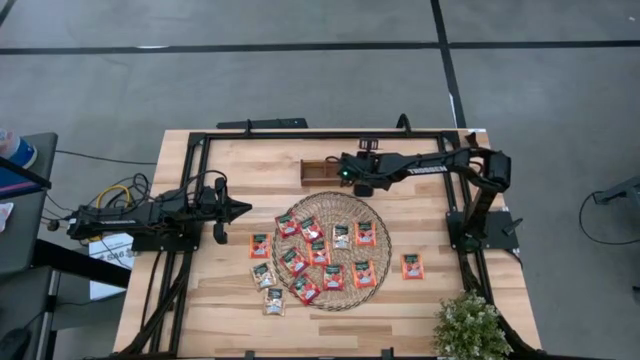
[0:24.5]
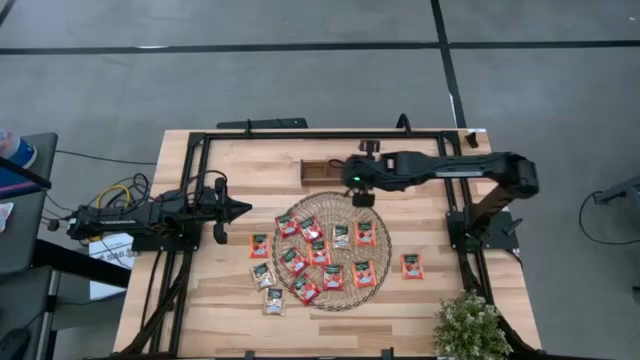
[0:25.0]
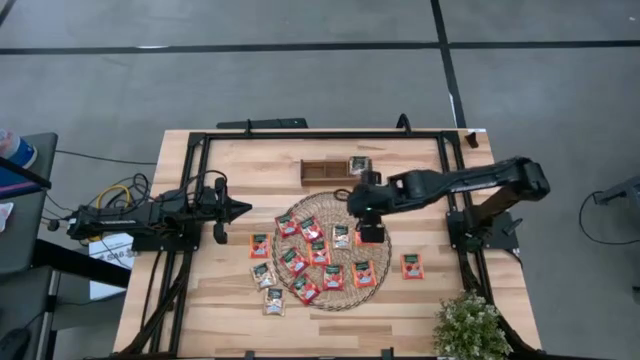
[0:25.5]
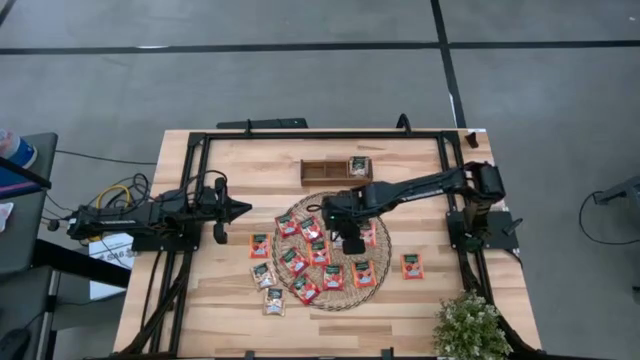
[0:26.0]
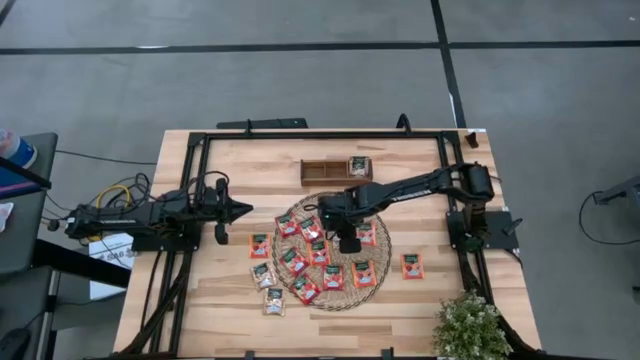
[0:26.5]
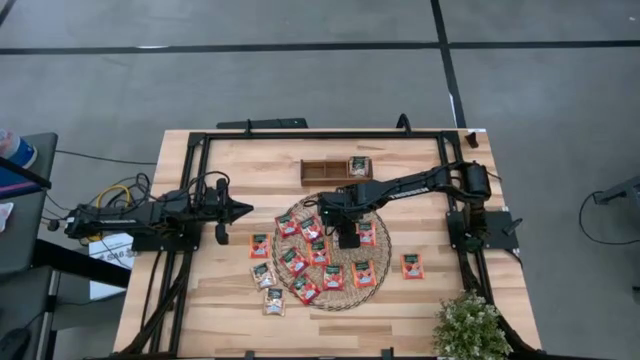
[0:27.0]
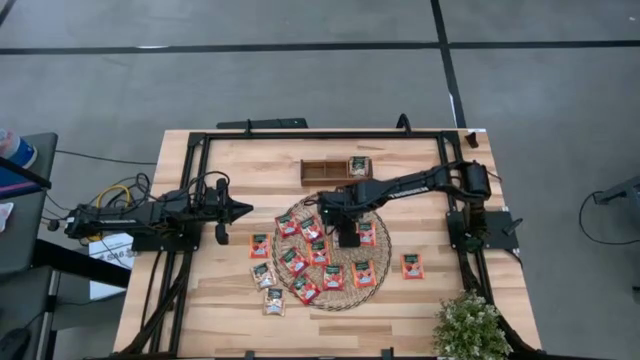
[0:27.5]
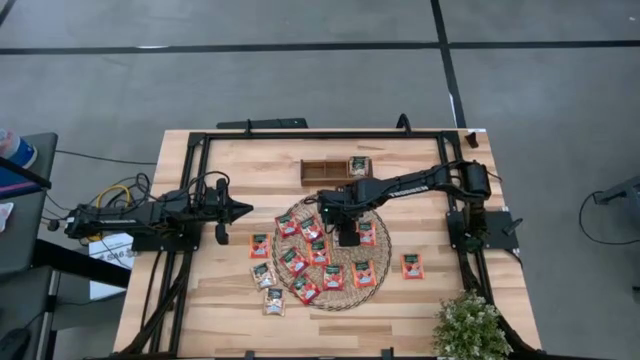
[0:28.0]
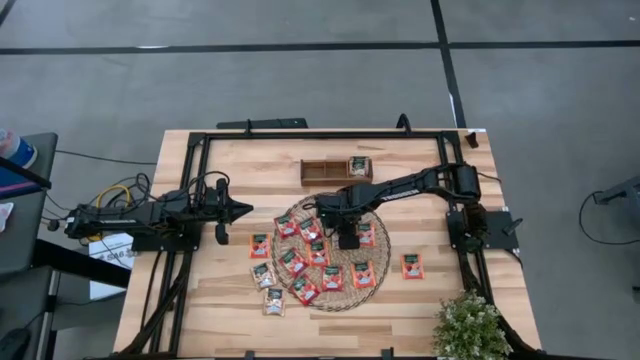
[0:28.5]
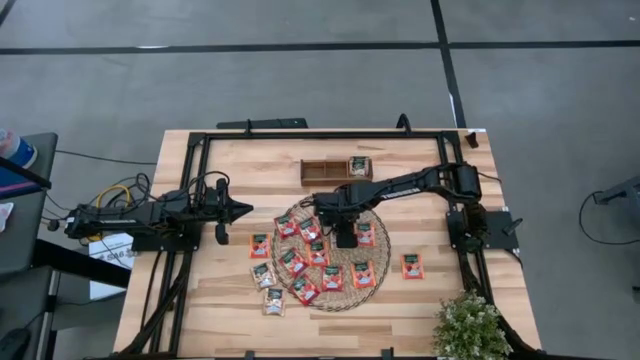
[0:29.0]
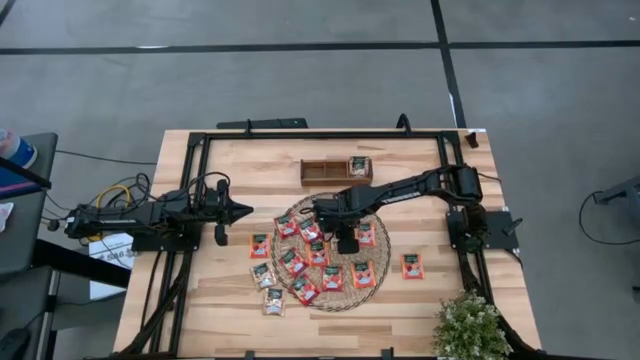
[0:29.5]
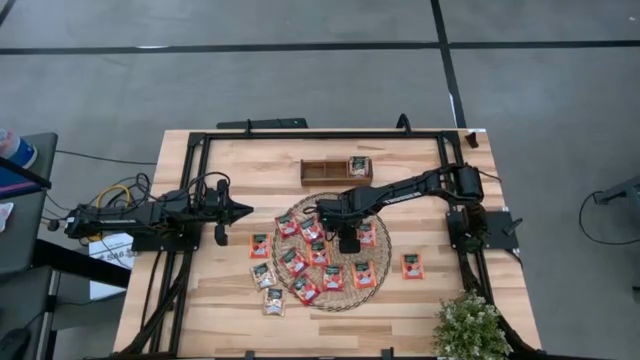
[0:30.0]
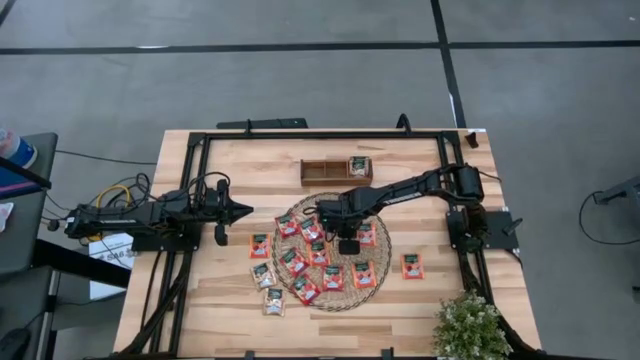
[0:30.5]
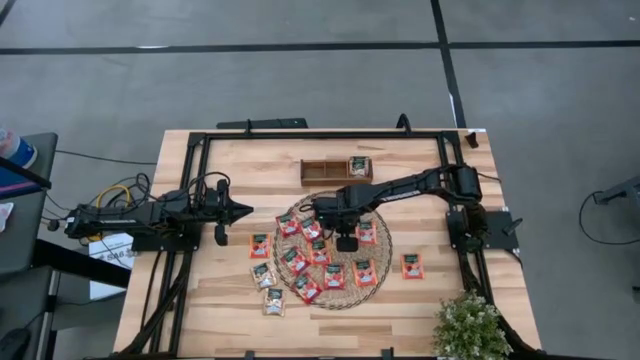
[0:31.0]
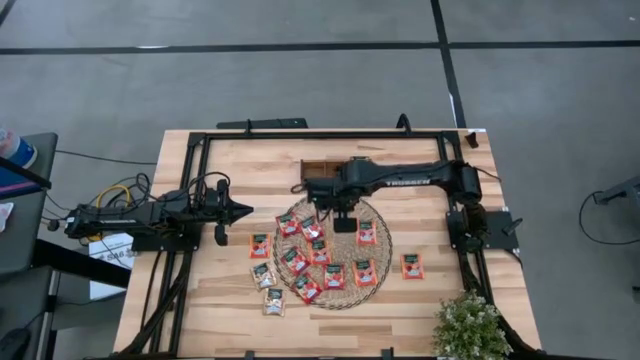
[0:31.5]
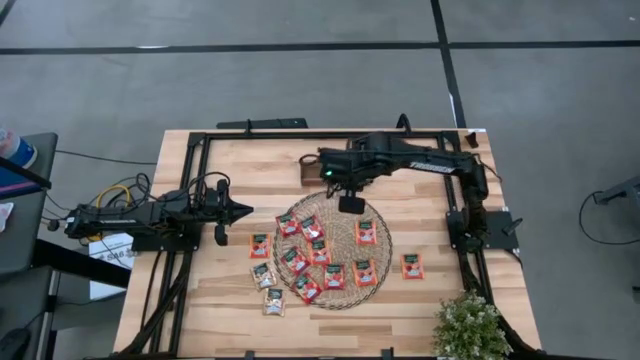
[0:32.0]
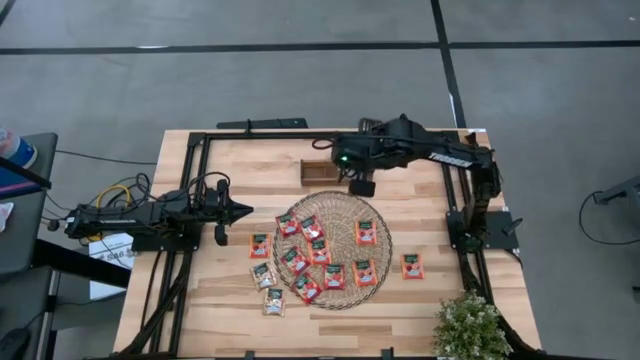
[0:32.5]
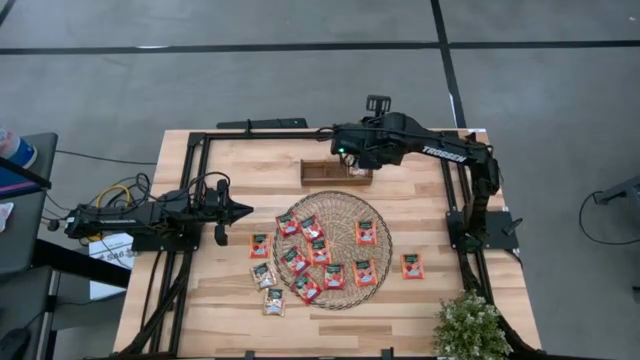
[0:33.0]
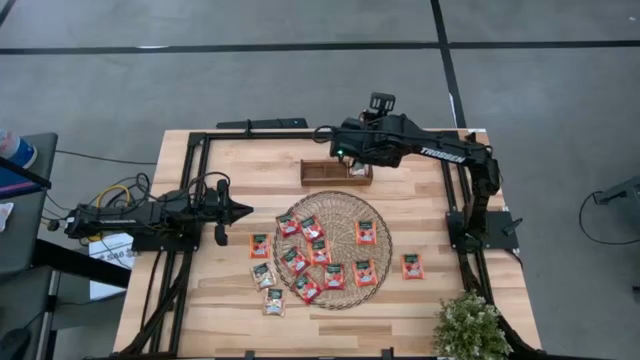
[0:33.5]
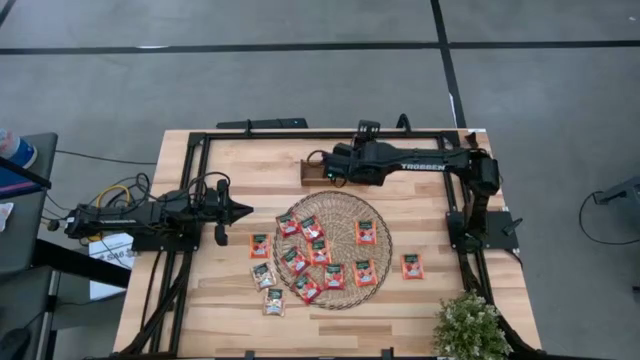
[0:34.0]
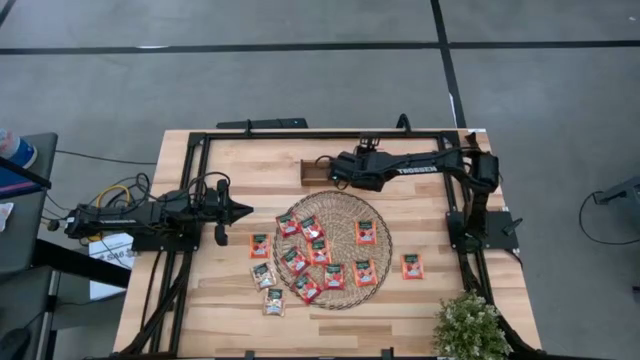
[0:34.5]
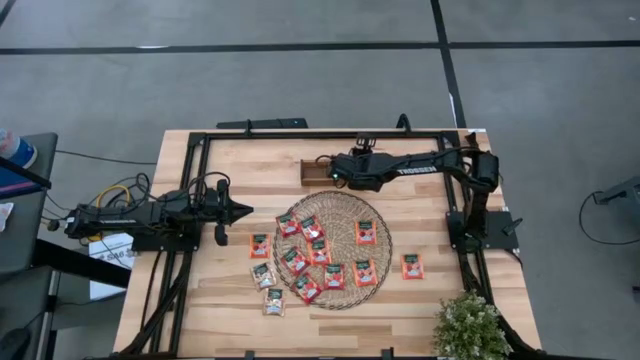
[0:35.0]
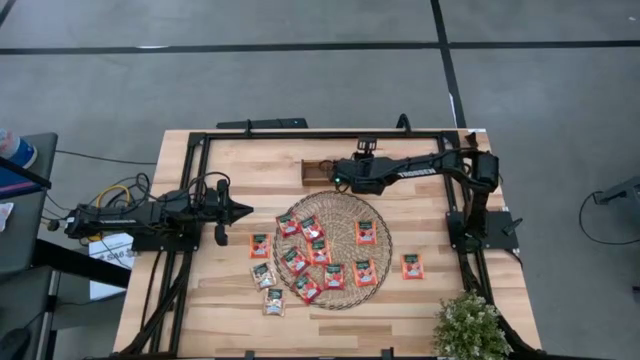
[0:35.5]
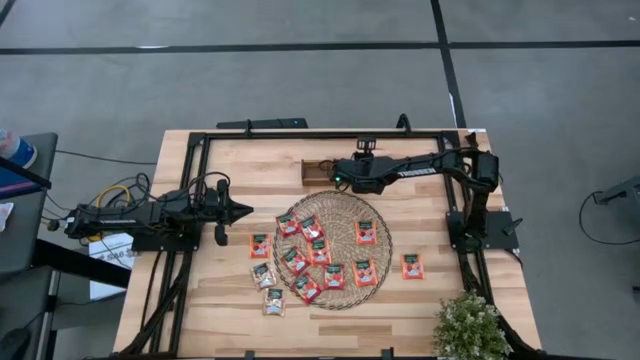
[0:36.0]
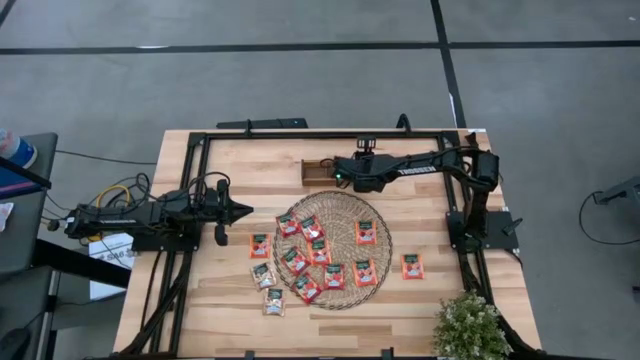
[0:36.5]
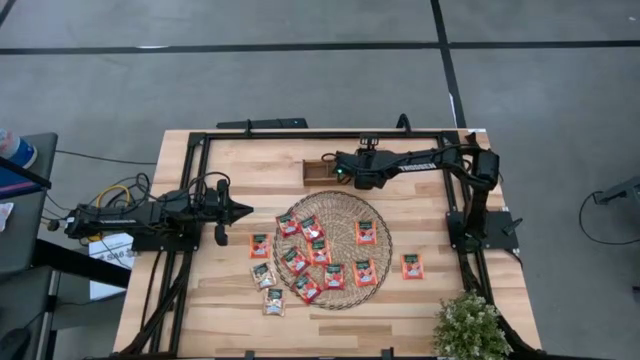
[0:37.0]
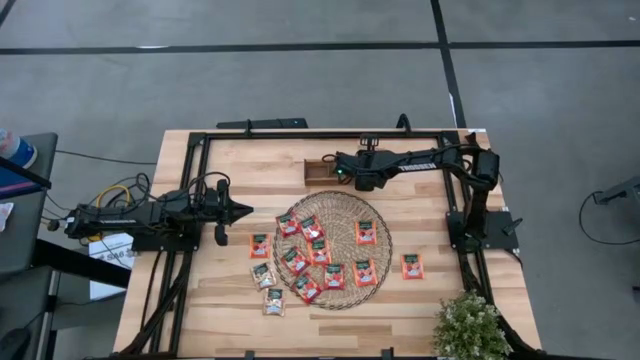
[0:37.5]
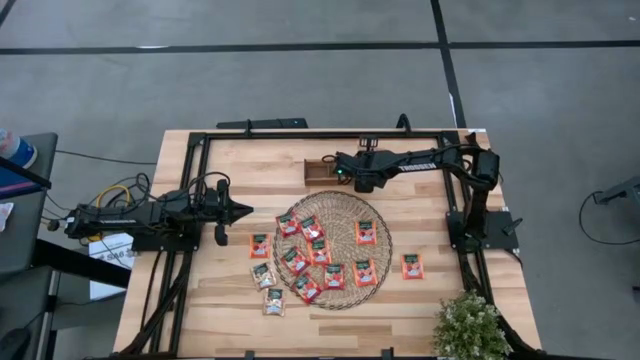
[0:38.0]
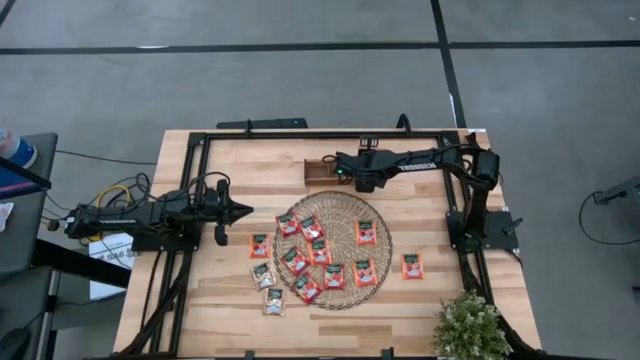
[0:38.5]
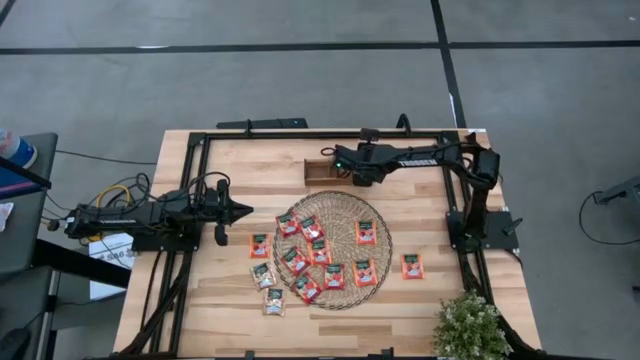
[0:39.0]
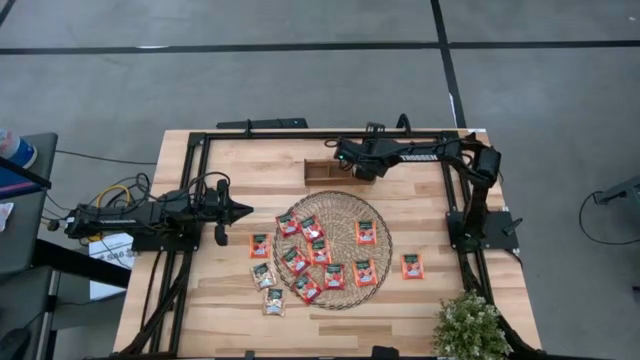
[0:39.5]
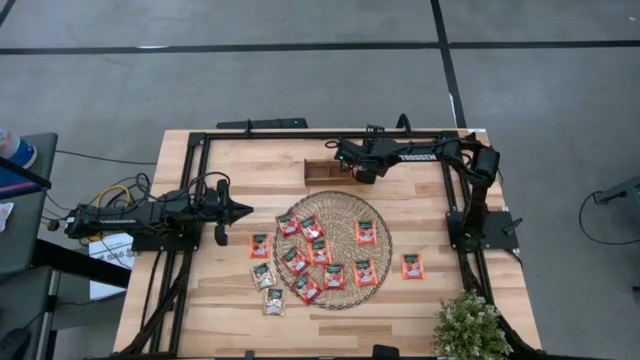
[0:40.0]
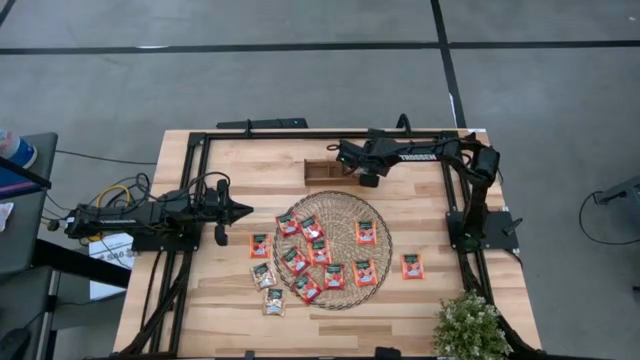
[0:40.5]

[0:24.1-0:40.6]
Task: Pick & Place Tea
Put the top brown tea bag into the right slot of the wooden organizer

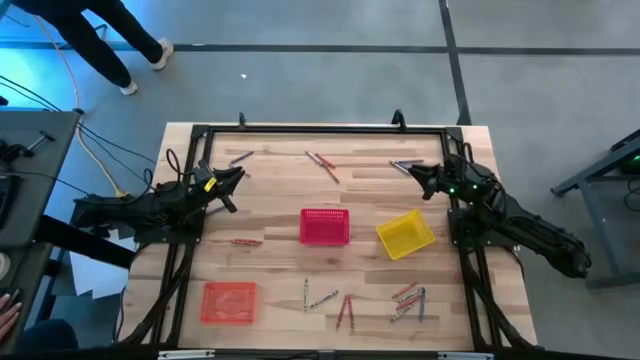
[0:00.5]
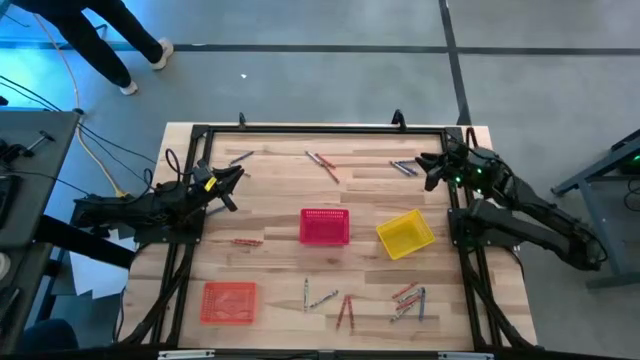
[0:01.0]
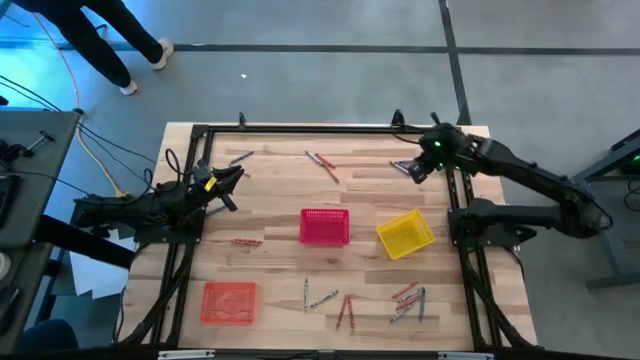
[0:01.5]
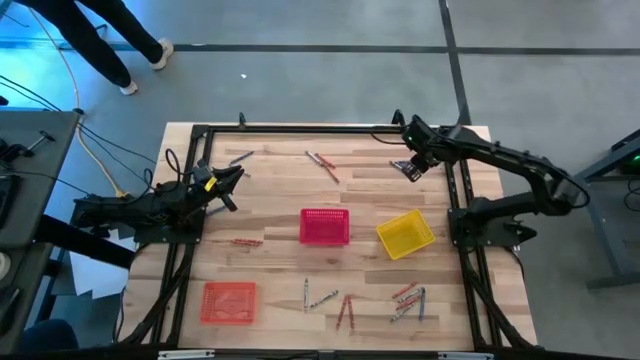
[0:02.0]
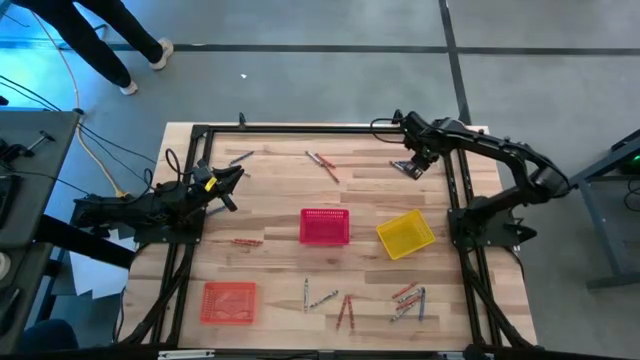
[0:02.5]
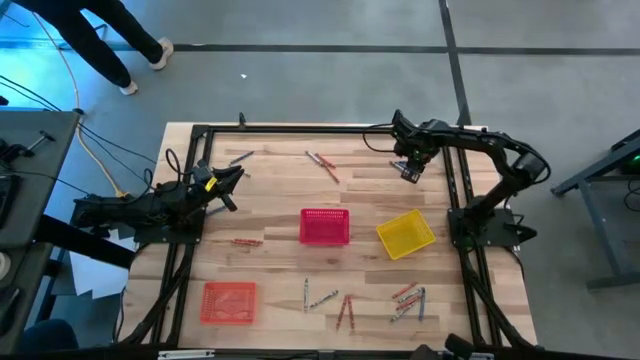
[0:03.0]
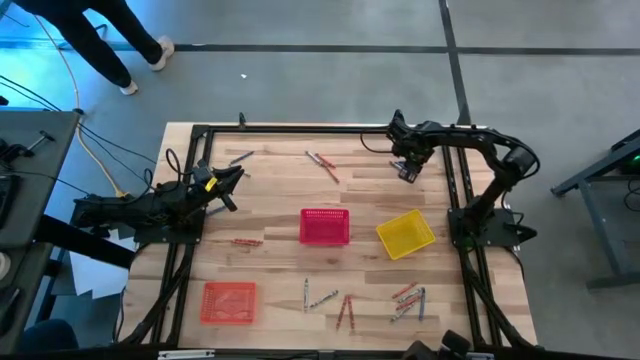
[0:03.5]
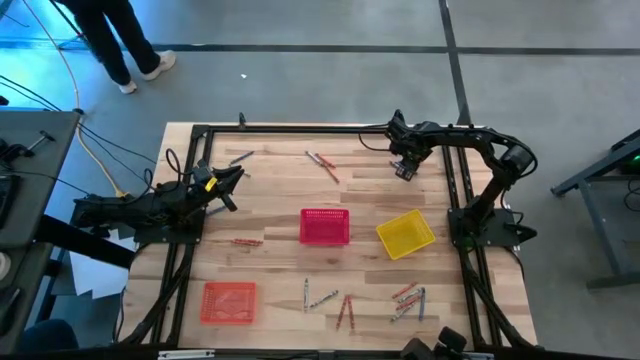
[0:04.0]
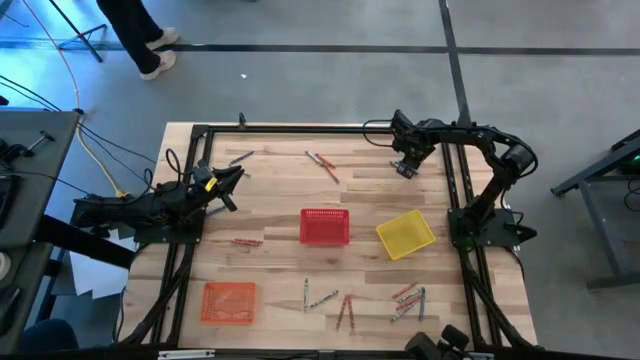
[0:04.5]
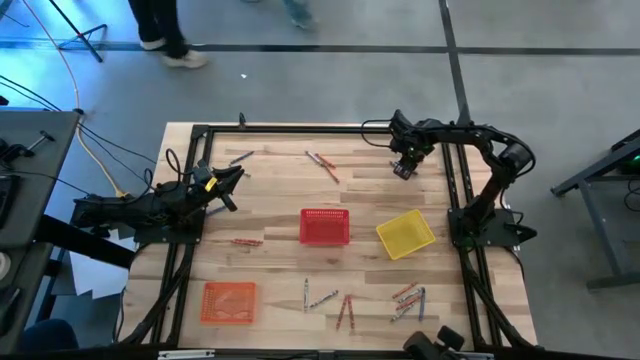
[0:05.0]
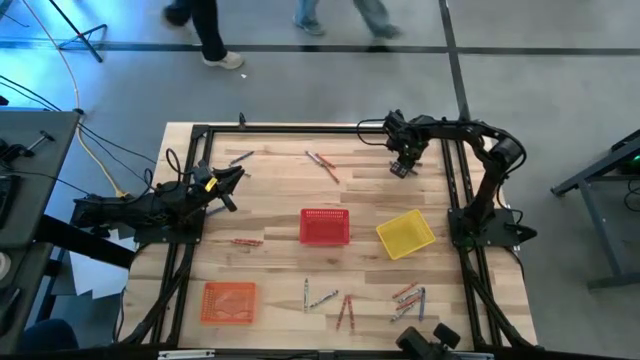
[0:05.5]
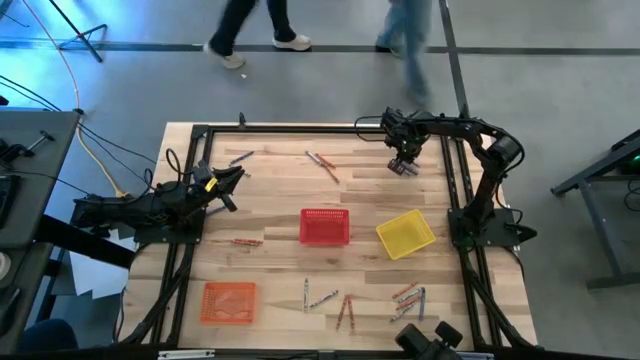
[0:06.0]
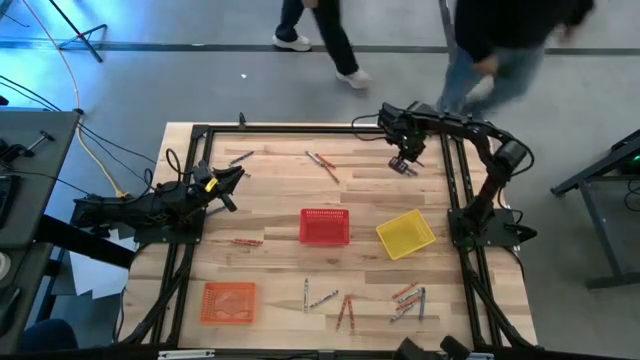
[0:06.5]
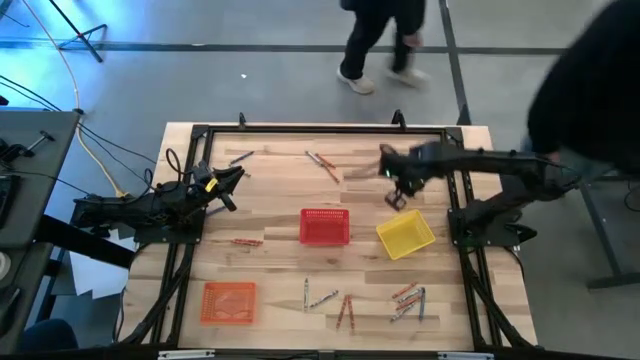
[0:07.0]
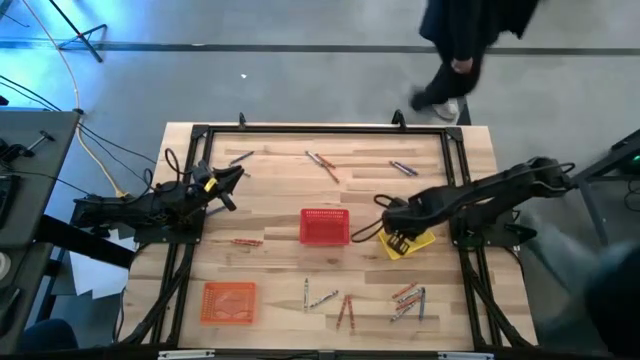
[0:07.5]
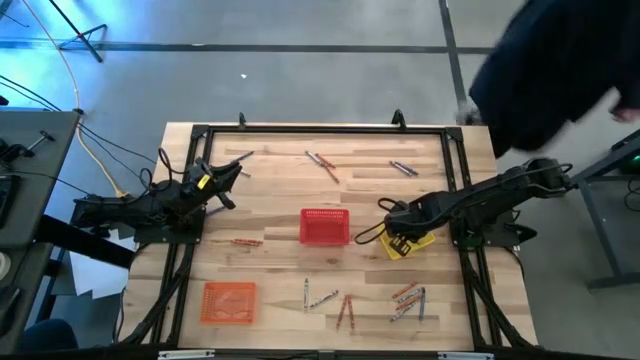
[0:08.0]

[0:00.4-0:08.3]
Task: Sort crayons
Put the blue crayon into the yellow bin
